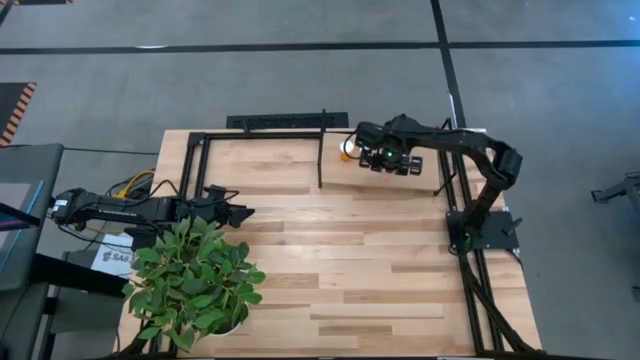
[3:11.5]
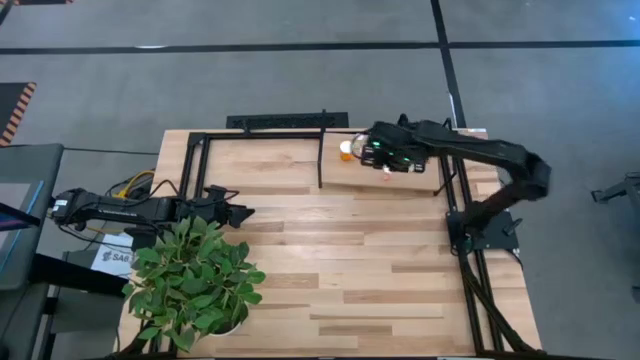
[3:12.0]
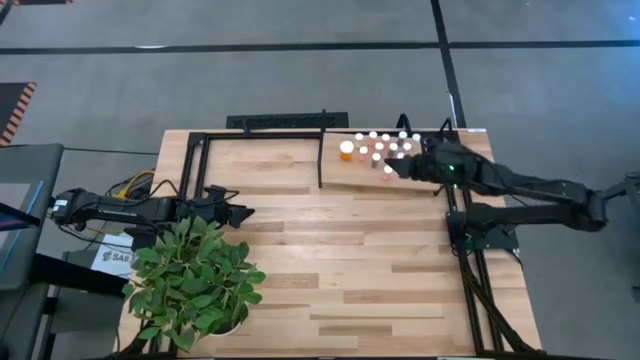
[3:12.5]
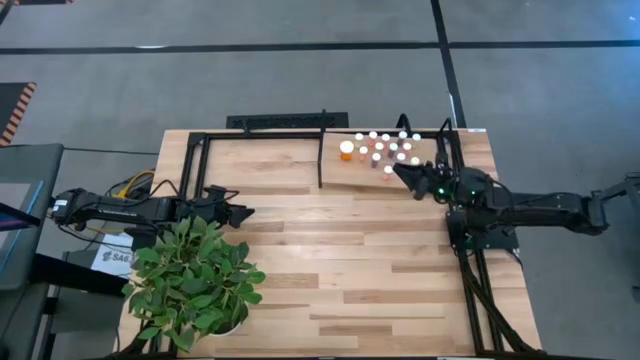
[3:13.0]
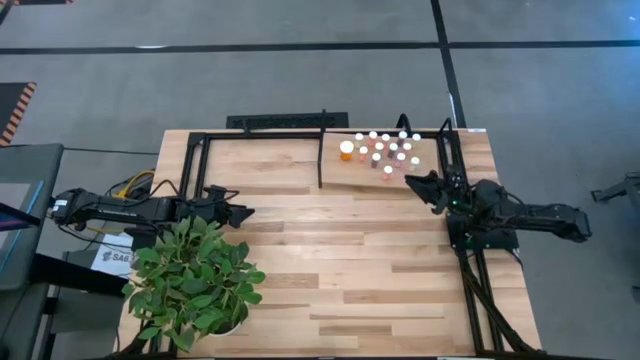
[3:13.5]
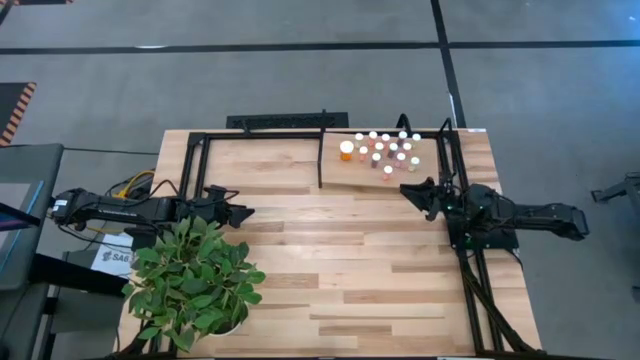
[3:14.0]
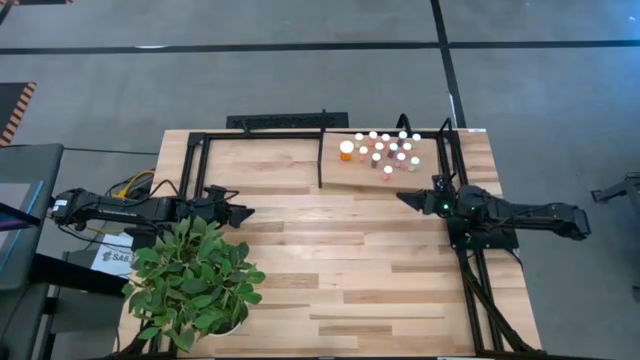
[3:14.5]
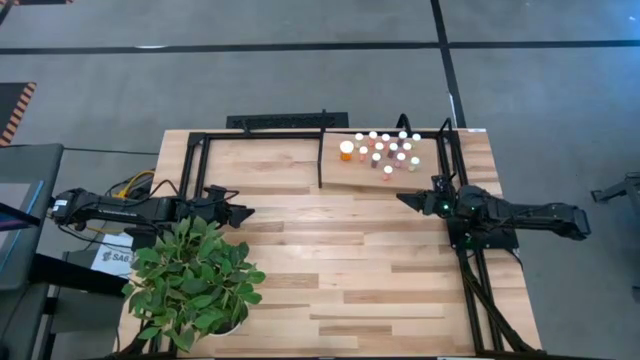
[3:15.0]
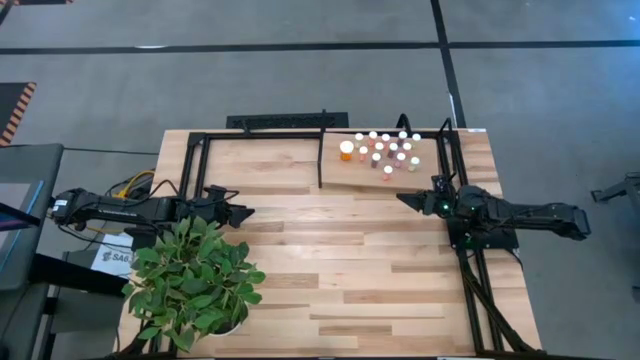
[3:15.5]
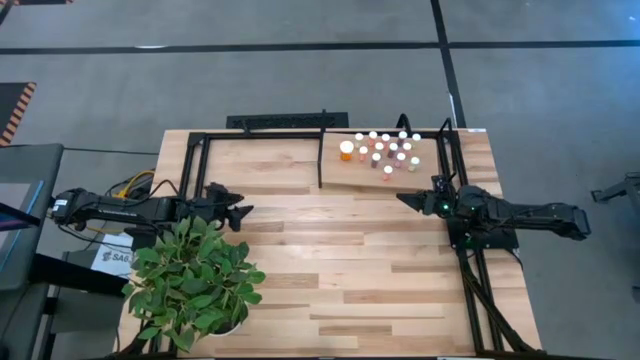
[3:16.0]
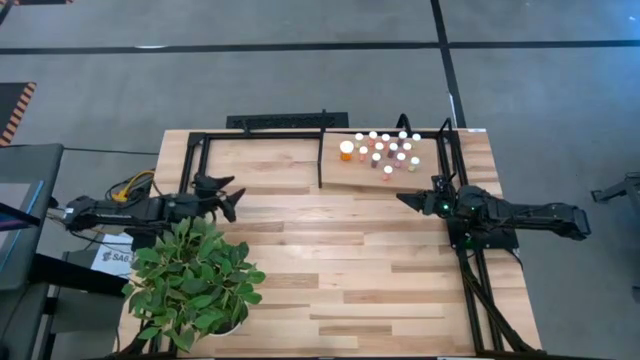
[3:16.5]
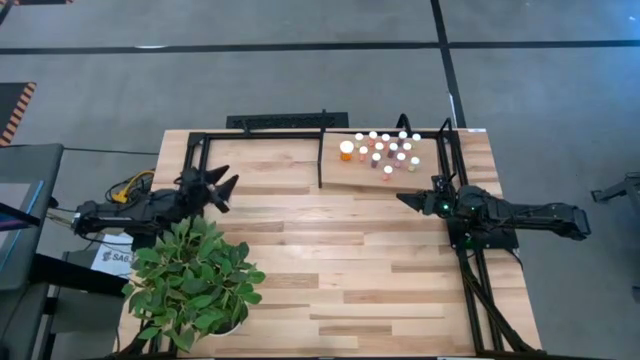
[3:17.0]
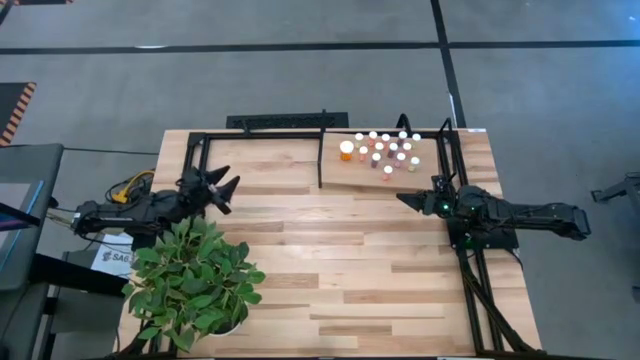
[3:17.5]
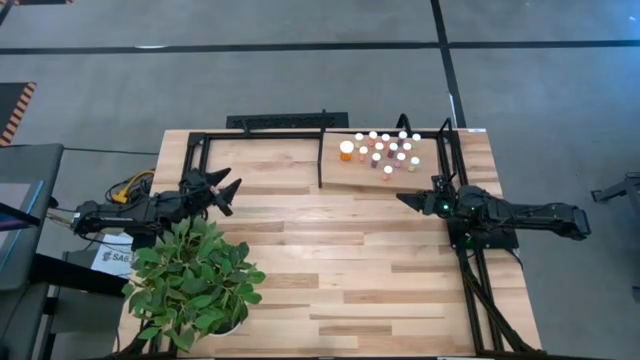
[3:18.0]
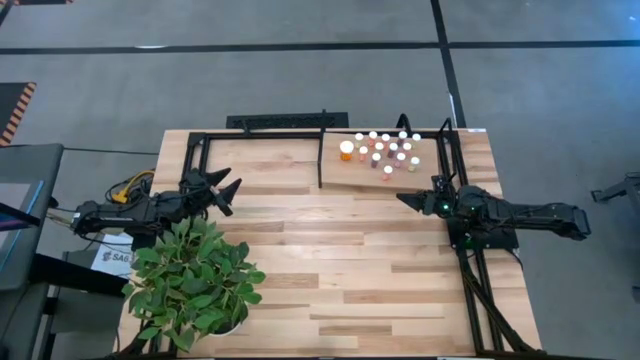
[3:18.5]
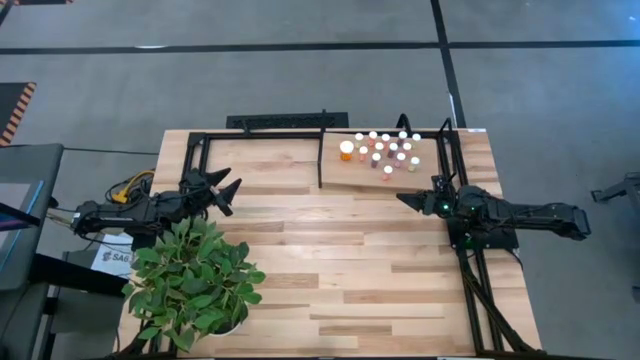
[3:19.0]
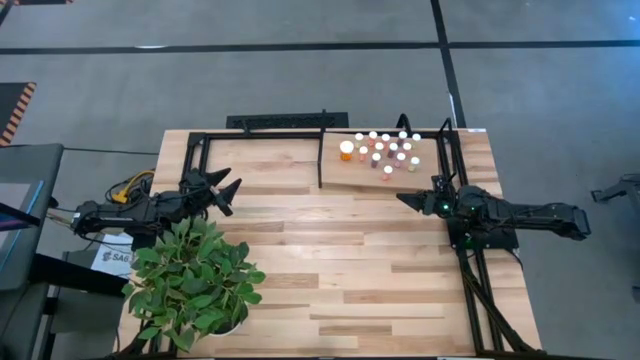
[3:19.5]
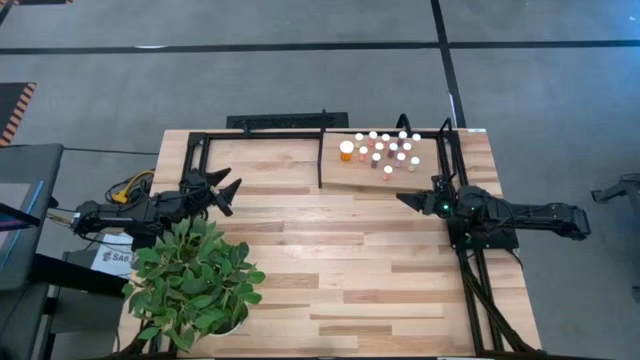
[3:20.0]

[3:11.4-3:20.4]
Task: Pick and place medicine bottles onto shelf by color
Return to Home Position

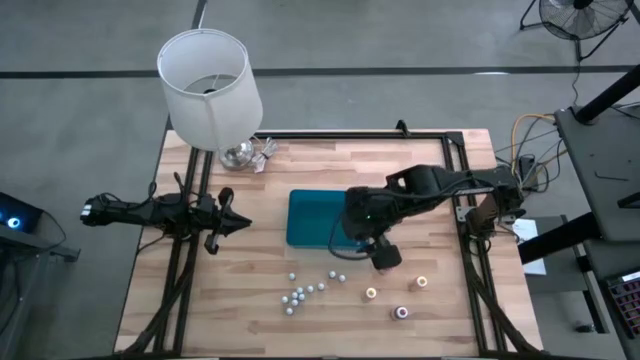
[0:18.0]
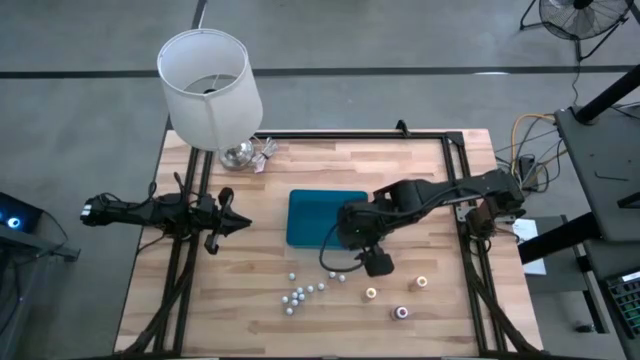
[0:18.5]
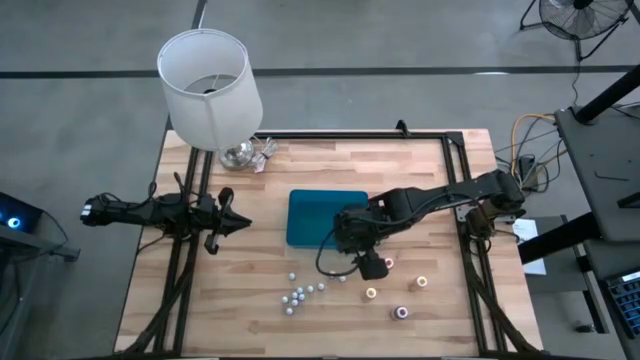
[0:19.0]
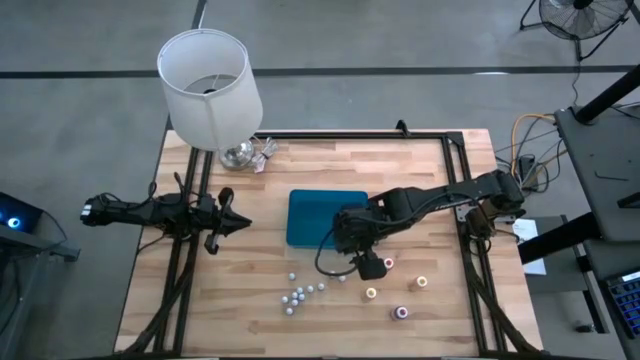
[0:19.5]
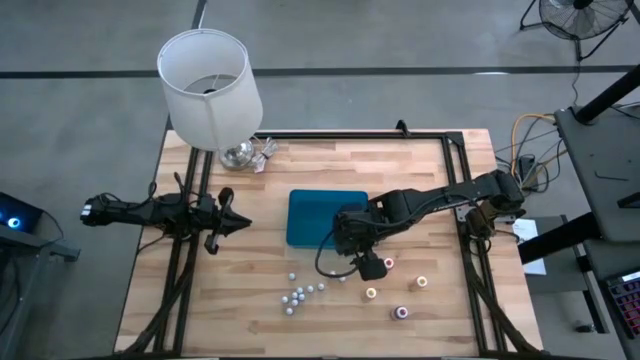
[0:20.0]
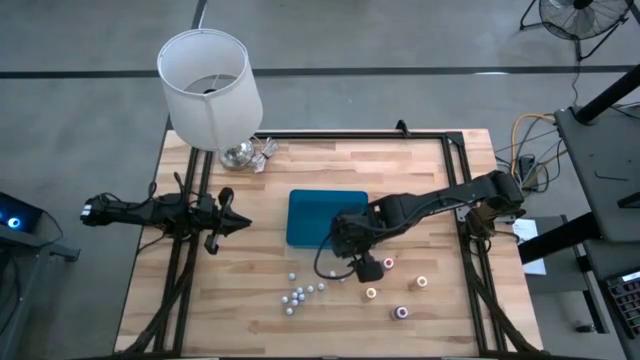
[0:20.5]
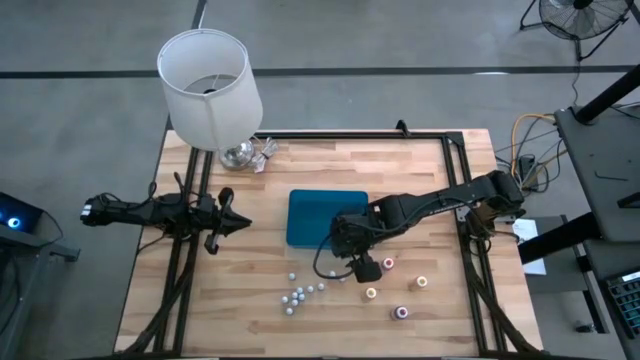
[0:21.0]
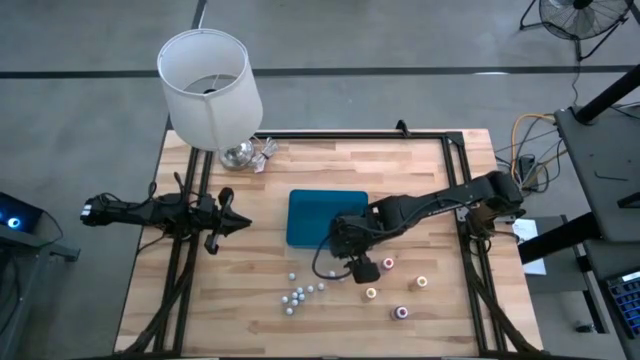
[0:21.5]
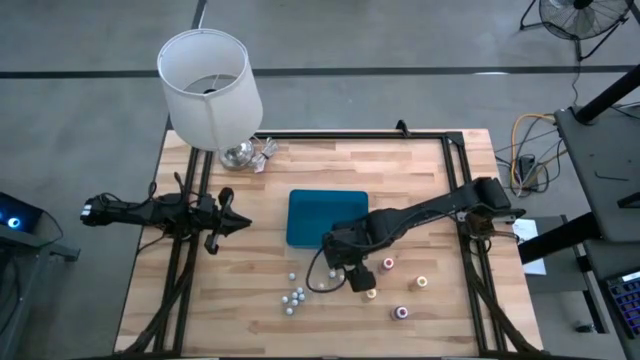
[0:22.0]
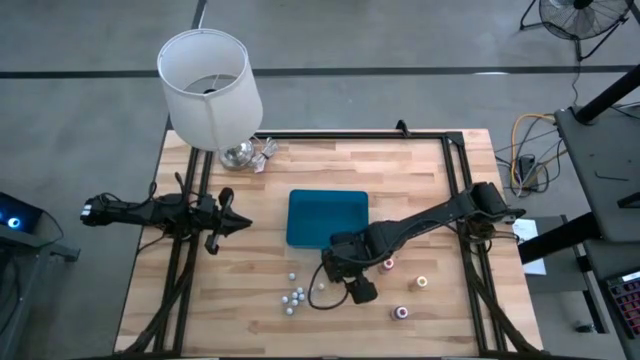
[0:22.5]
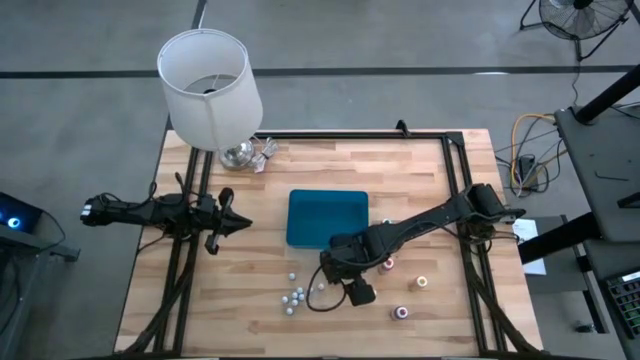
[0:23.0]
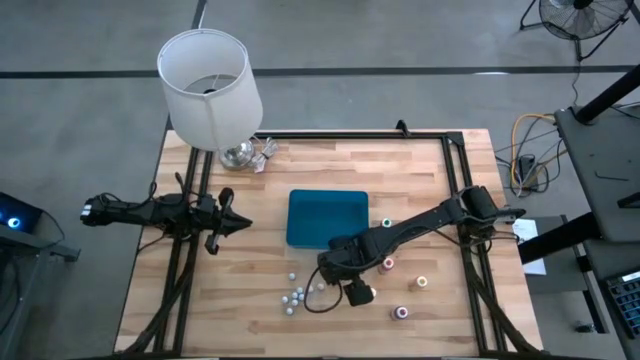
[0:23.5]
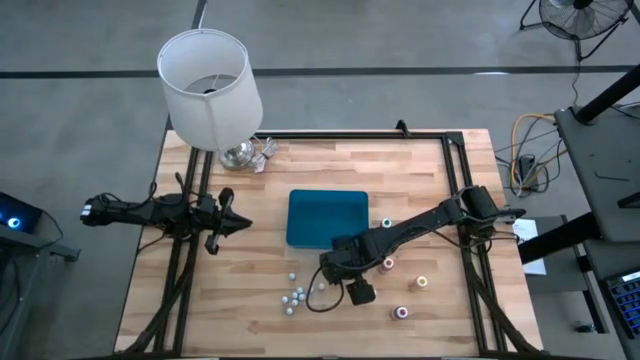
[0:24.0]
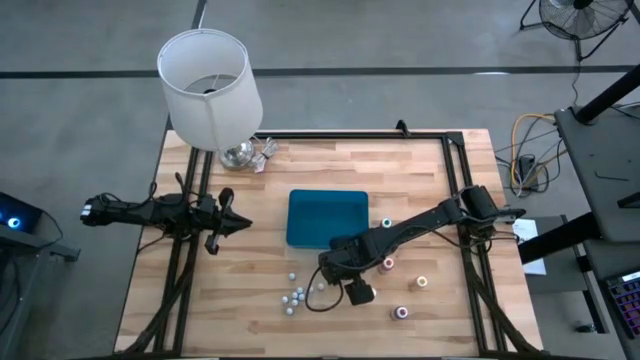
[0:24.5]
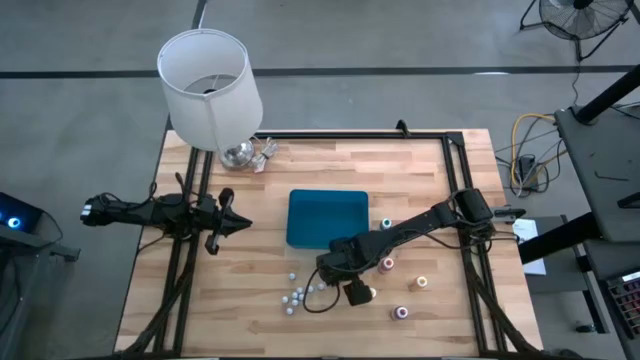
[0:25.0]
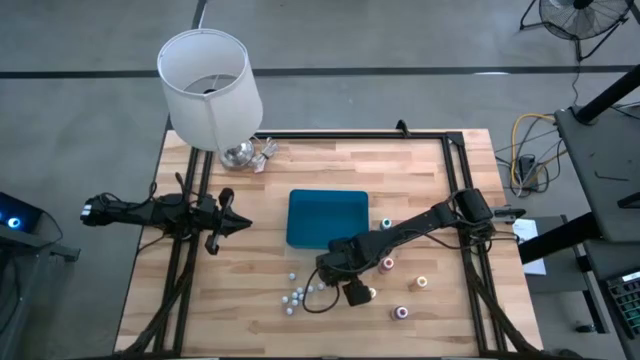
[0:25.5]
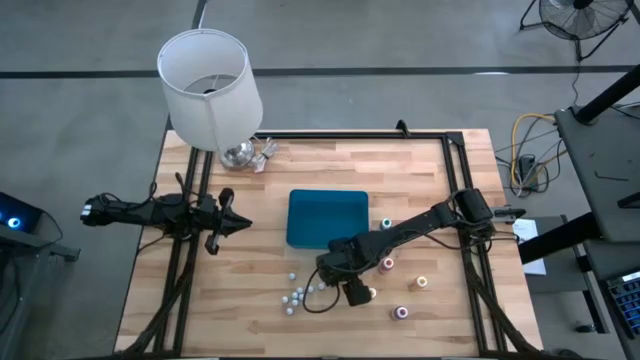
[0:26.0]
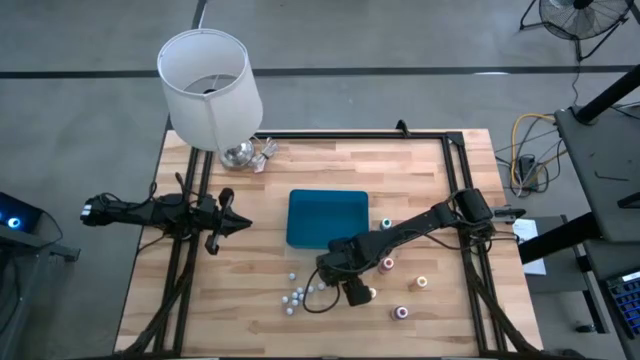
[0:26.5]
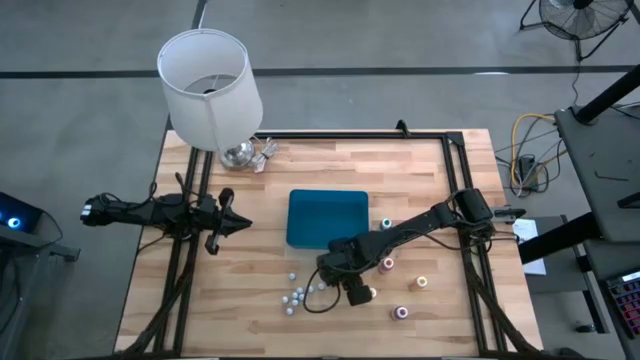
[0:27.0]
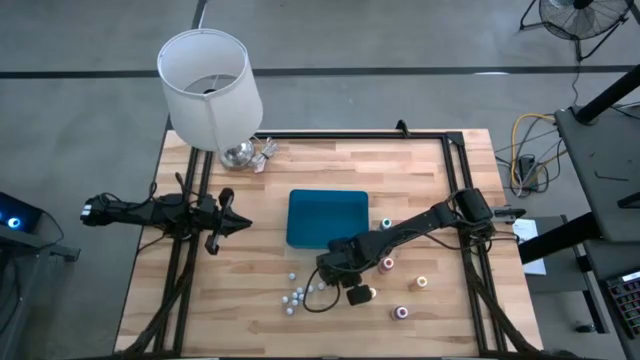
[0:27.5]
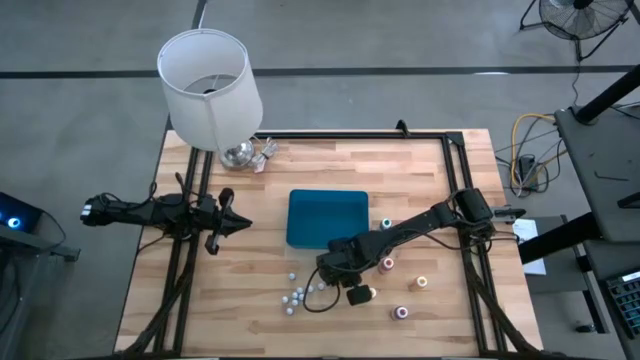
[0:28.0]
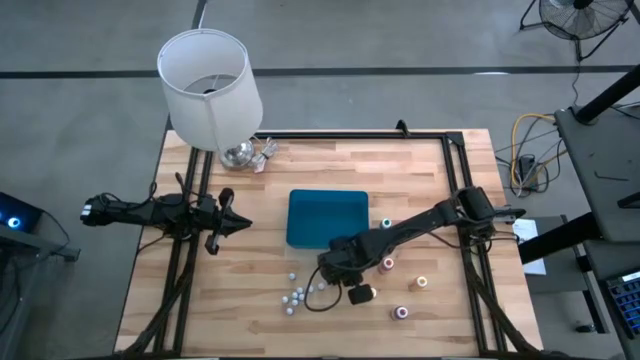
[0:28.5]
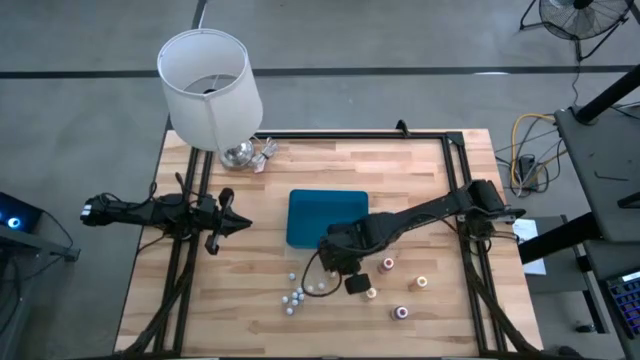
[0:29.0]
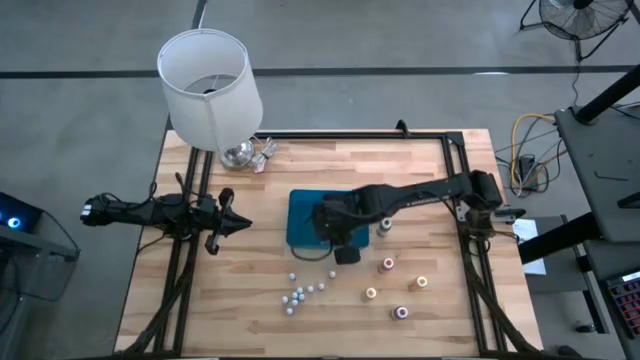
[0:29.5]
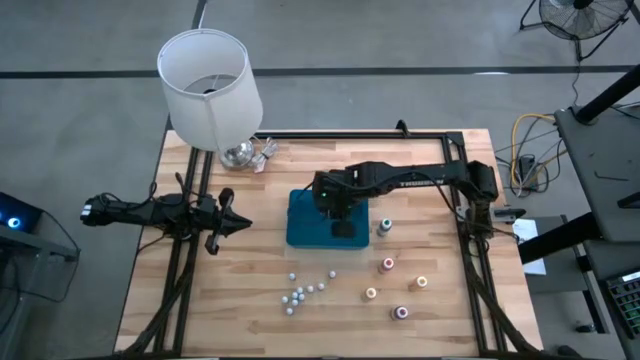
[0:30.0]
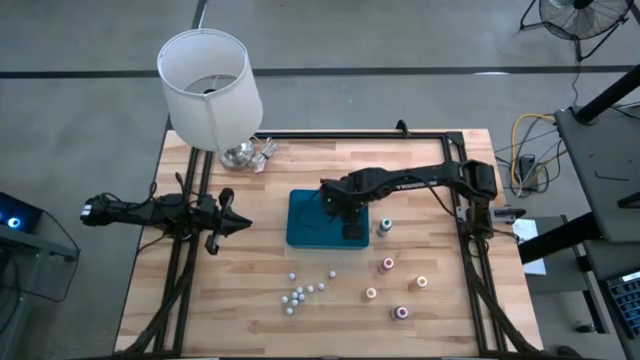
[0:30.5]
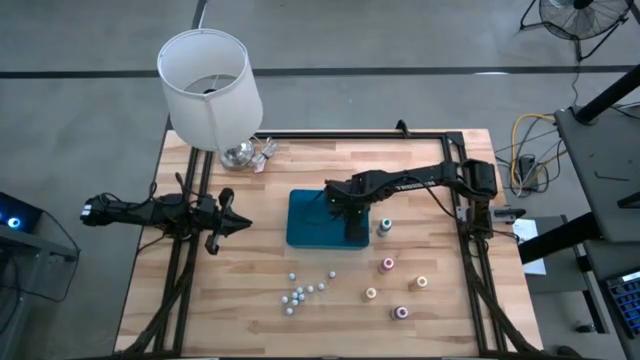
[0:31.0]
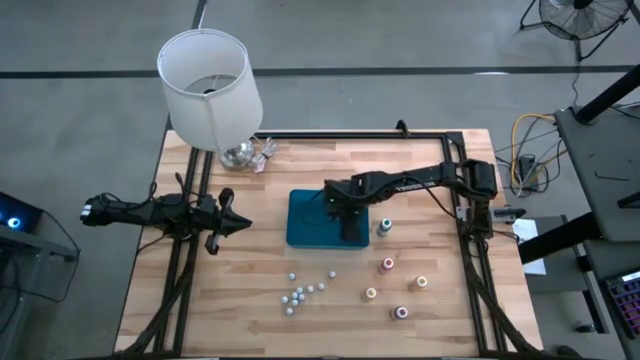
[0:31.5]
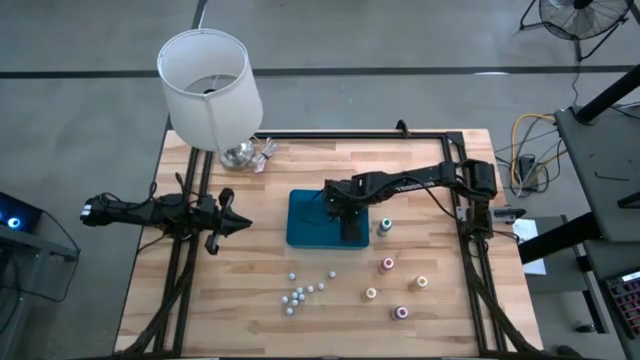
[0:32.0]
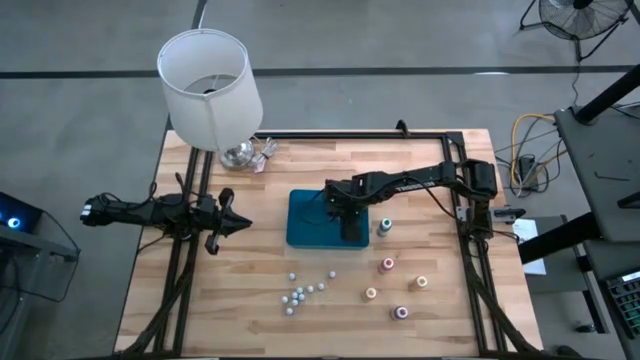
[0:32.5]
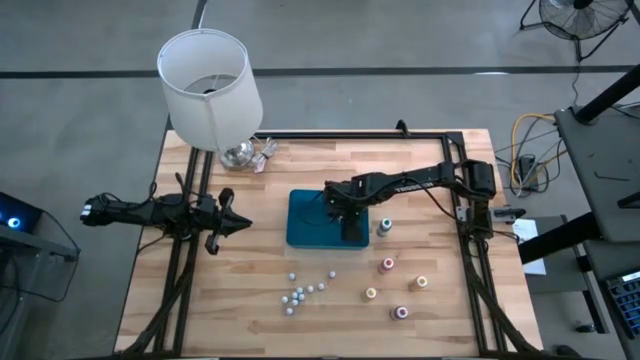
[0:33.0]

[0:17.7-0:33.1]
Task: Pick & Place food coloring
Put the right small red food coloring bottle into the blue bin
